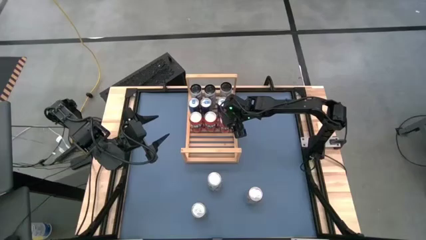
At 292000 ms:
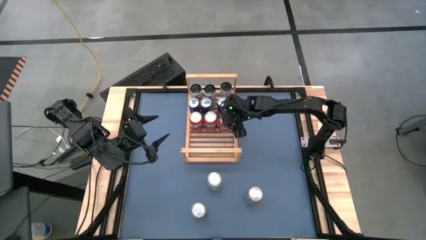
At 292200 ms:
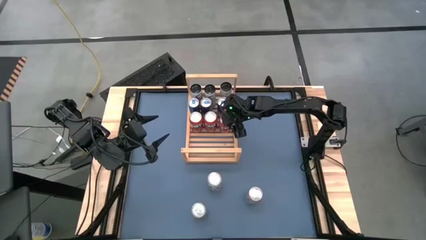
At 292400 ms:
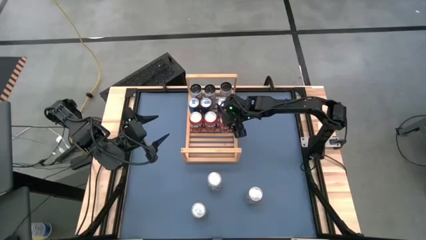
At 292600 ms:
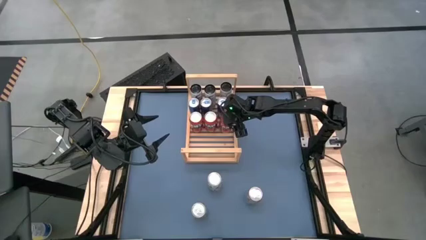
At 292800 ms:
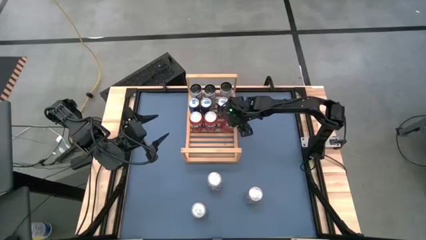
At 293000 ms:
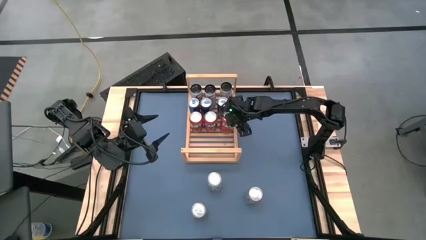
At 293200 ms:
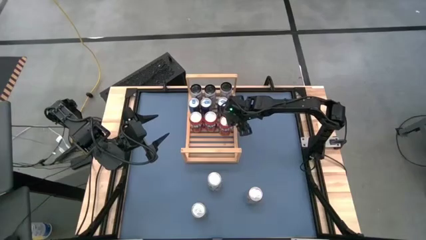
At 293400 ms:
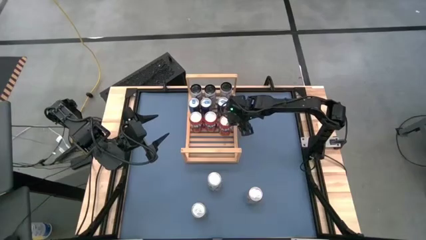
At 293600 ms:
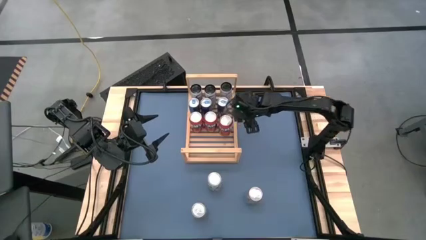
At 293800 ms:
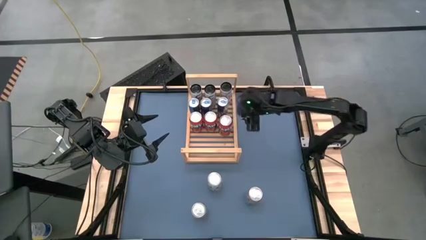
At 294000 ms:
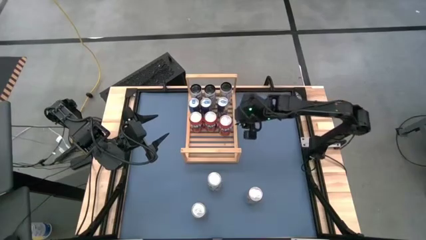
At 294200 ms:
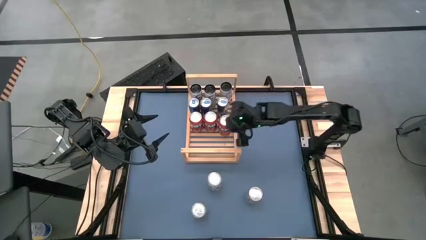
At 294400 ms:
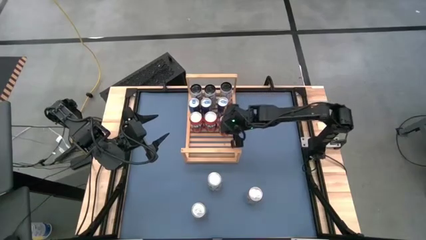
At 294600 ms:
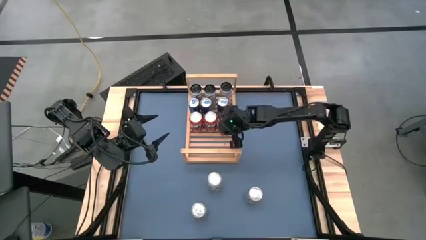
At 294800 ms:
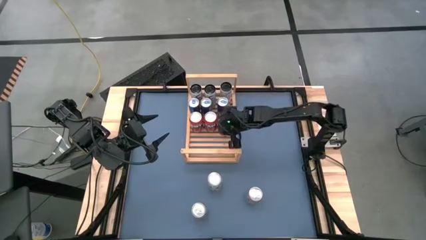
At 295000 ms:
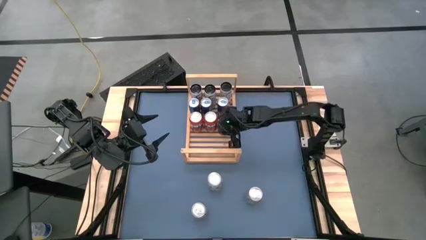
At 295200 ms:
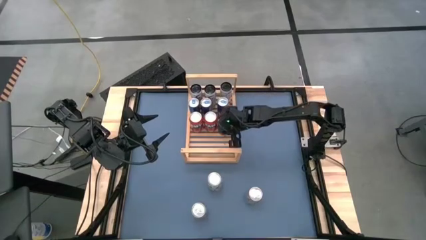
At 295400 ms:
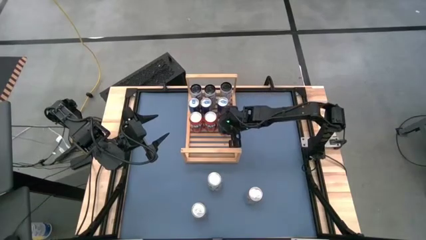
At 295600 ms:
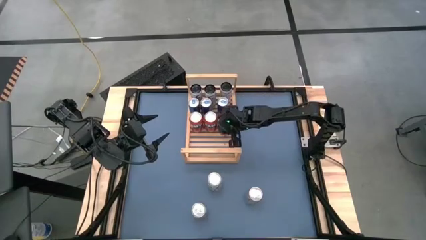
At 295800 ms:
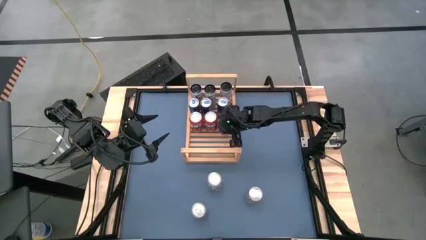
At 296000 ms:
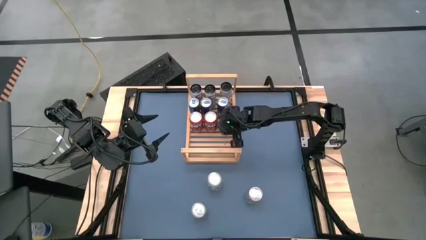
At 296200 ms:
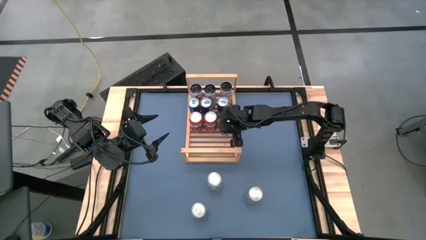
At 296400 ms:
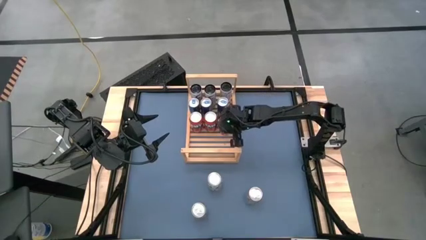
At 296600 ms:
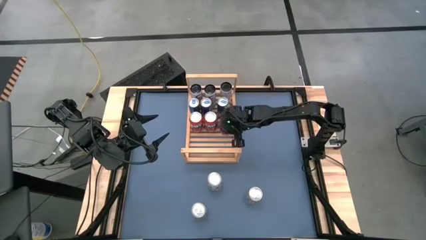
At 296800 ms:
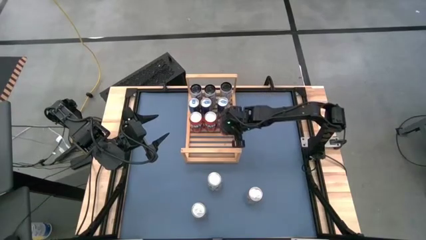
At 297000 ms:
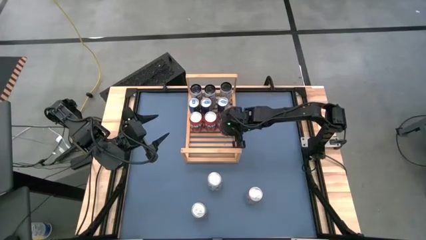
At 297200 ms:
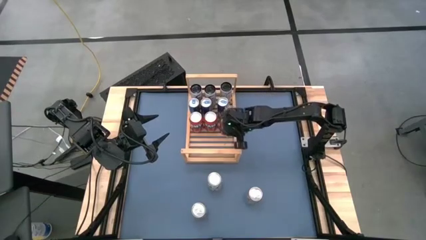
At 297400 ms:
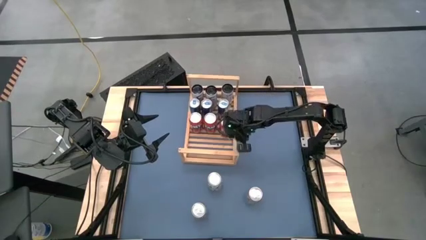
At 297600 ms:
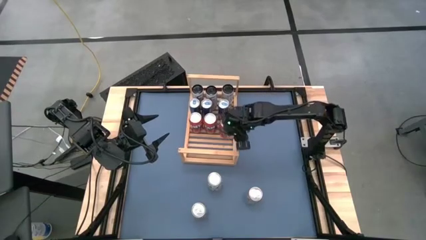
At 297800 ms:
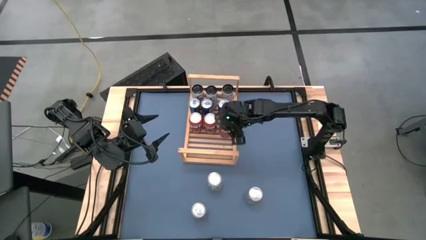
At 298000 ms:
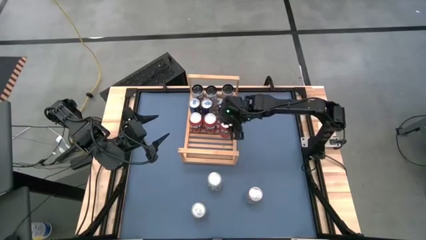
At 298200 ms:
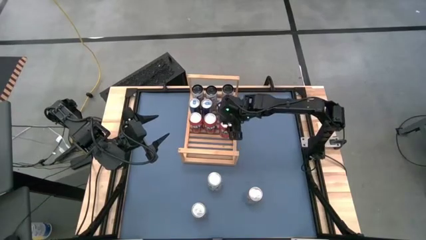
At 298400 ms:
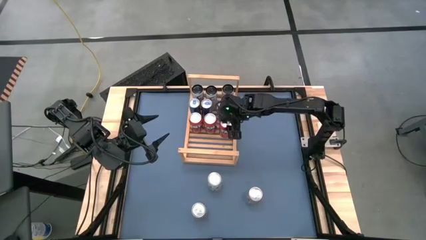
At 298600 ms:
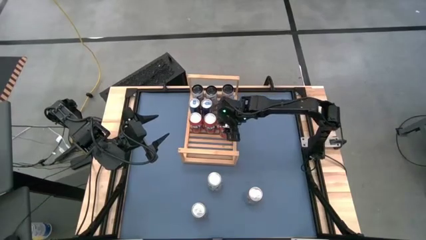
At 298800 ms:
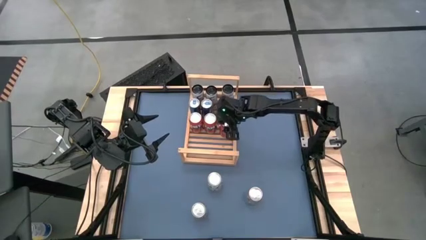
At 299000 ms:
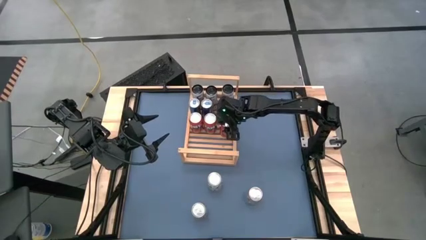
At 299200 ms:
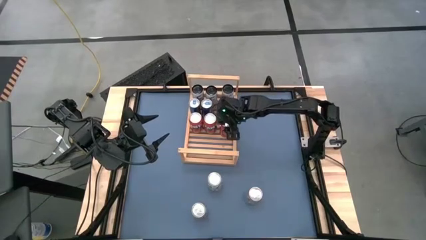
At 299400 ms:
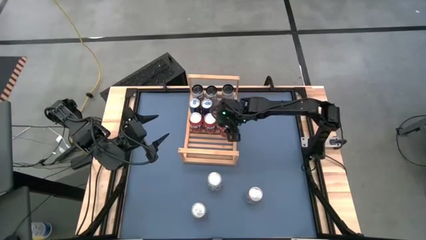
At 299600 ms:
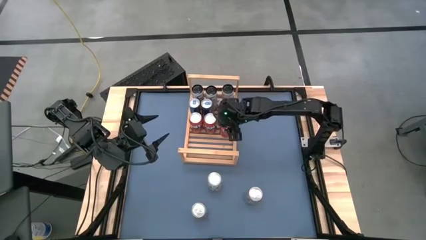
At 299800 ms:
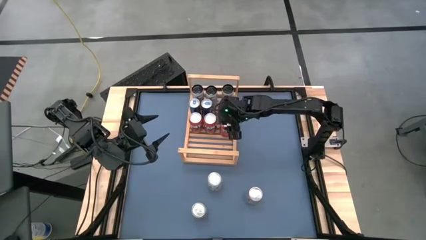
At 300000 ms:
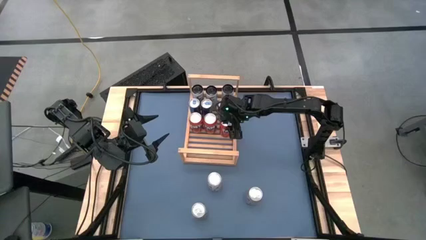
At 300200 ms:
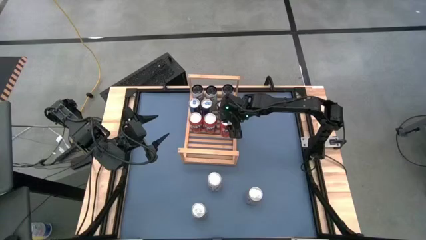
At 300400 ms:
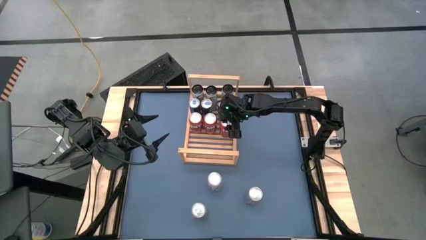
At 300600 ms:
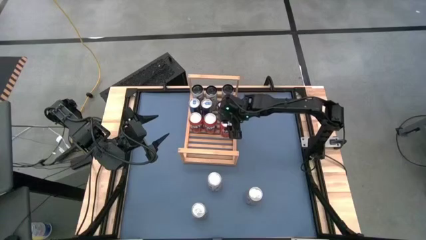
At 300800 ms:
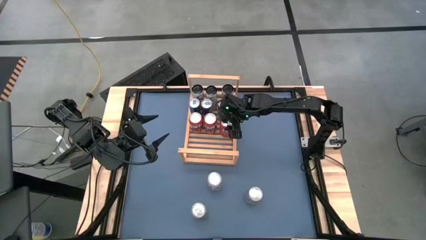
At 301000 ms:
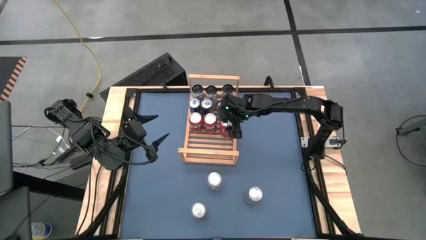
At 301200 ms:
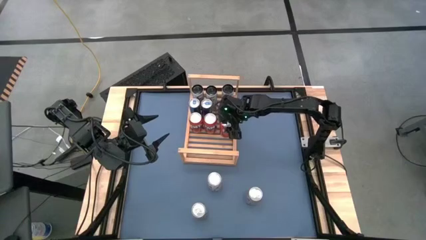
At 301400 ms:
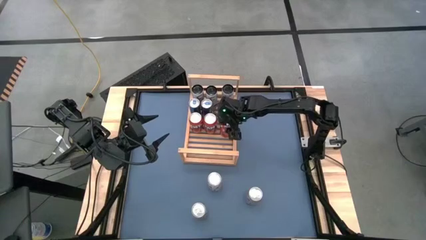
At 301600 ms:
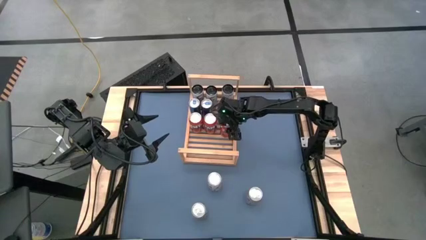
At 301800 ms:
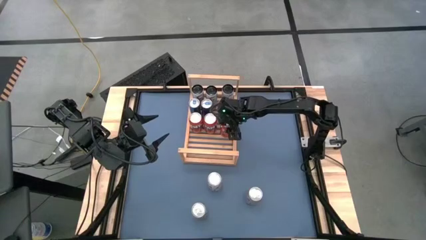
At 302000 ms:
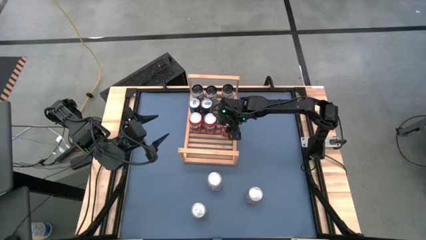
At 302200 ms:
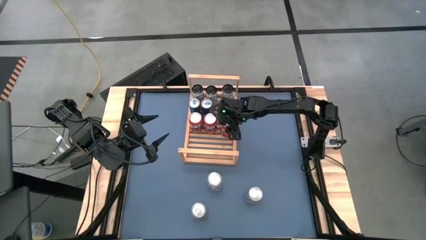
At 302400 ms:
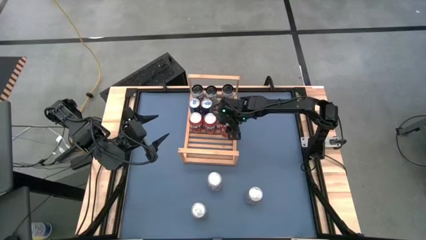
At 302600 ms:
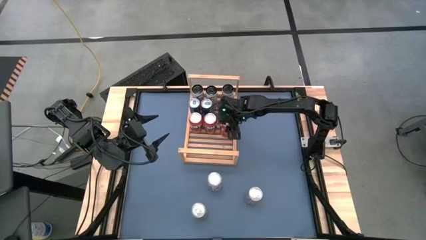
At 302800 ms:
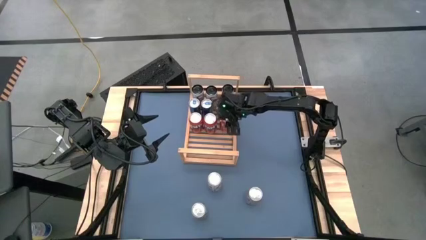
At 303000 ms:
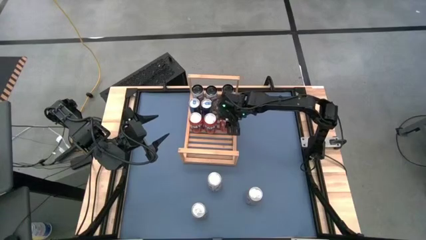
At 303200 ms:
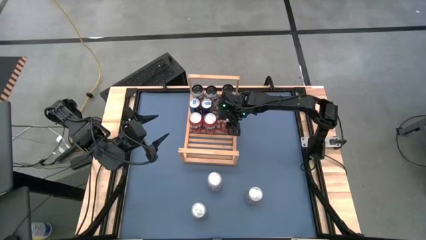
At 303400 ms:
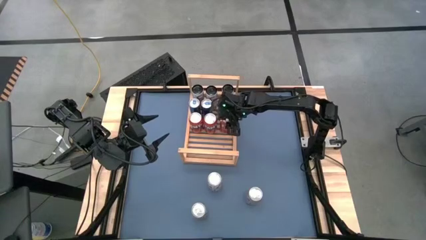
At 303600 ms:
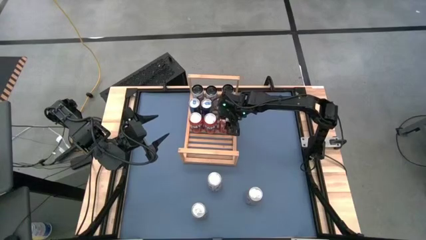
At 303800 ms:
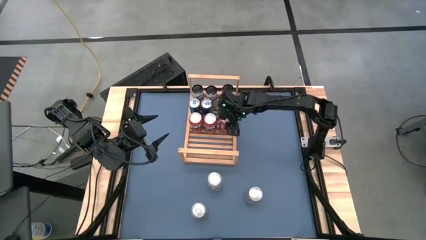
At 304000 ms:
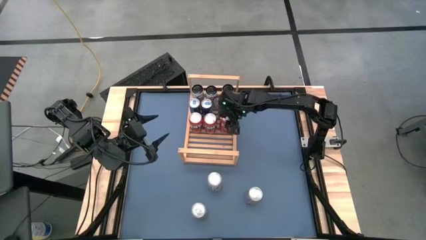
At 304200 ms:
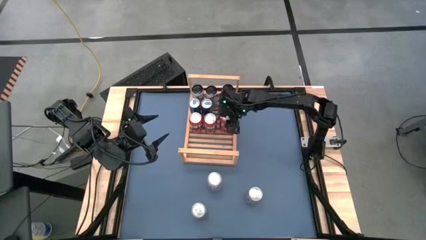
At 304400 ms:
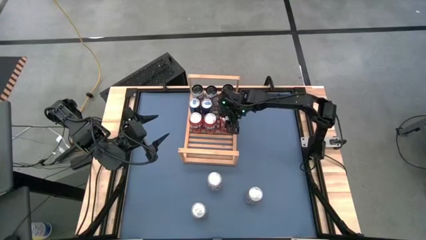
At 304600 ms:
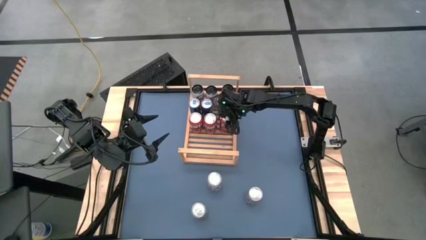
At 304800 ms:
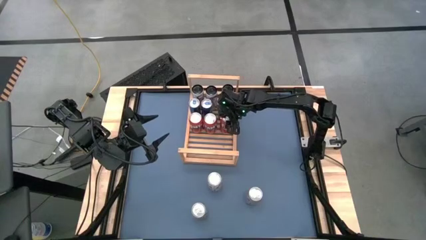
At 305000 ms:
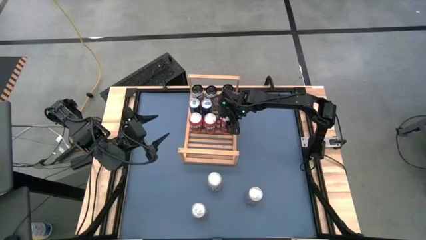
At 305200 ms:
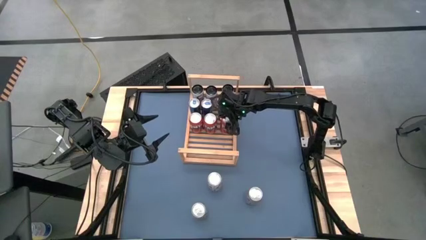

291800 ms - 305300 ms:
Task: Place canned beverage on shelf
Put the orange soda can on the shelf aligned with the other orange soda cans

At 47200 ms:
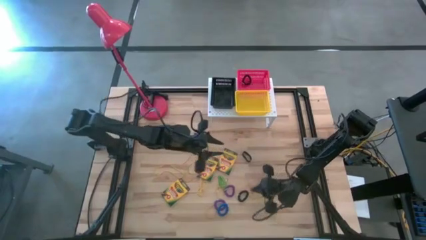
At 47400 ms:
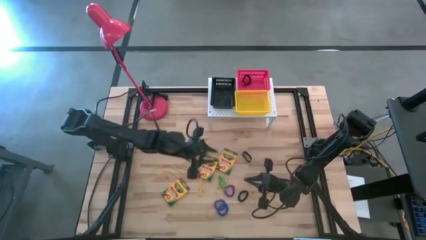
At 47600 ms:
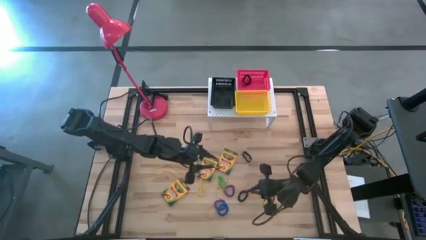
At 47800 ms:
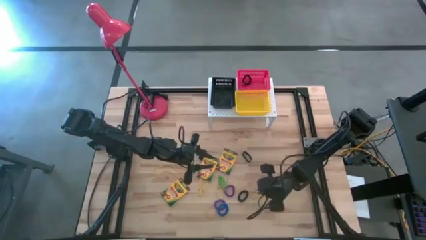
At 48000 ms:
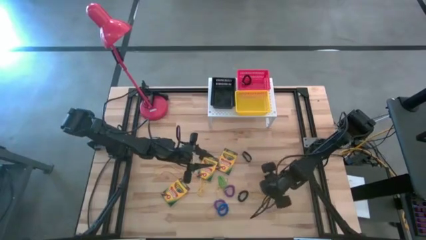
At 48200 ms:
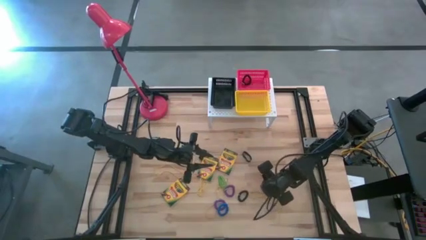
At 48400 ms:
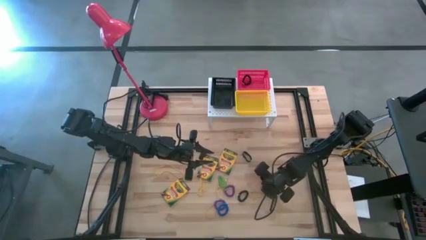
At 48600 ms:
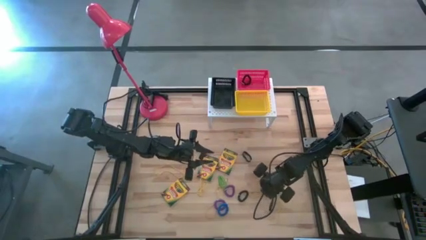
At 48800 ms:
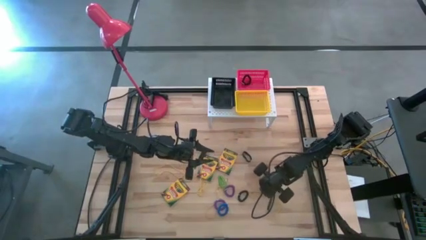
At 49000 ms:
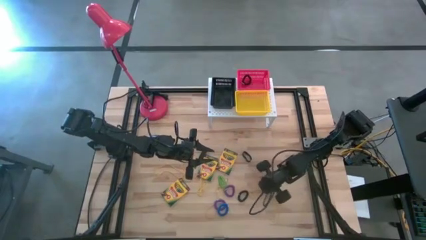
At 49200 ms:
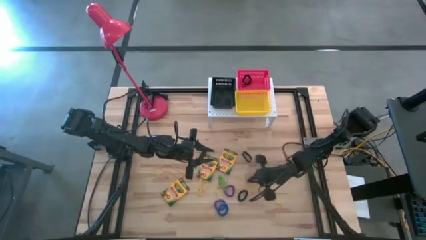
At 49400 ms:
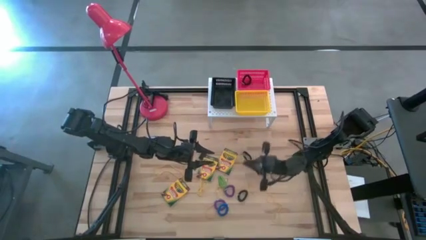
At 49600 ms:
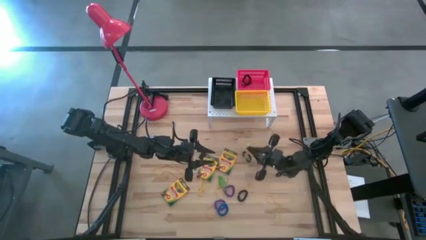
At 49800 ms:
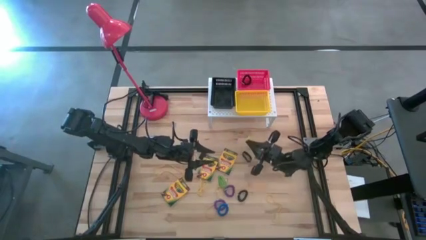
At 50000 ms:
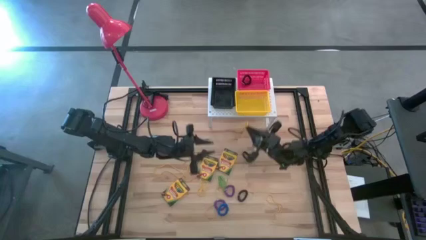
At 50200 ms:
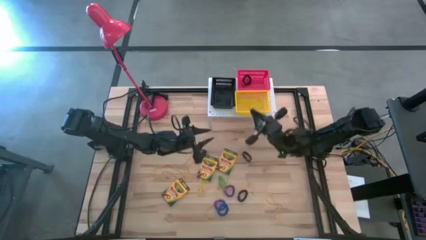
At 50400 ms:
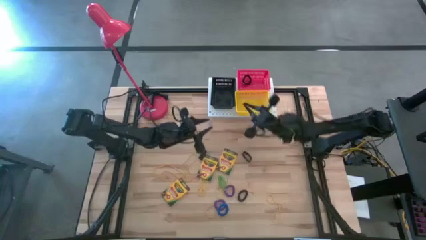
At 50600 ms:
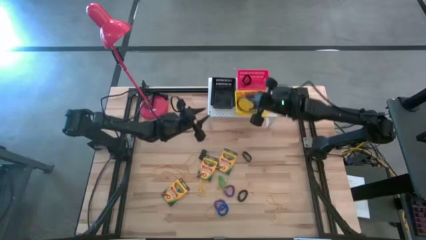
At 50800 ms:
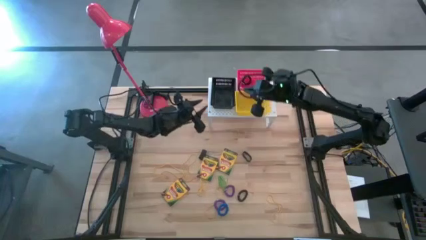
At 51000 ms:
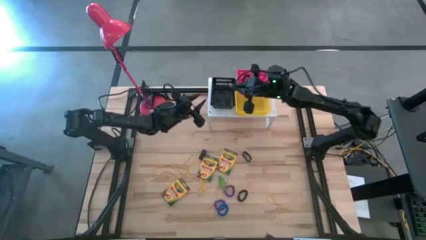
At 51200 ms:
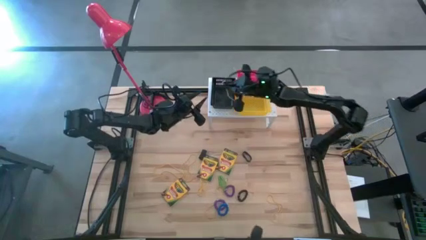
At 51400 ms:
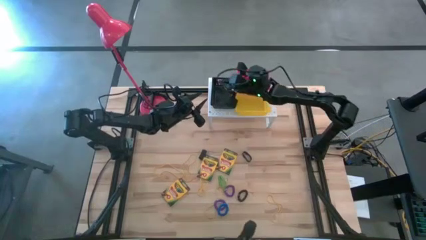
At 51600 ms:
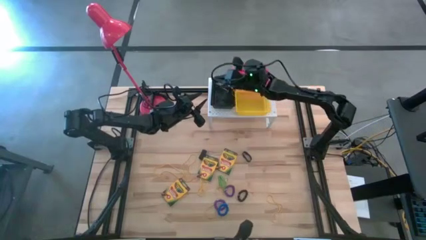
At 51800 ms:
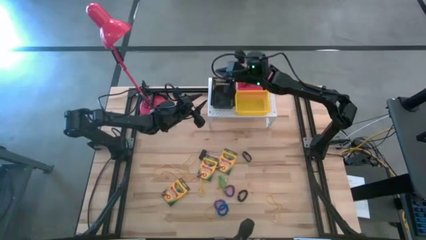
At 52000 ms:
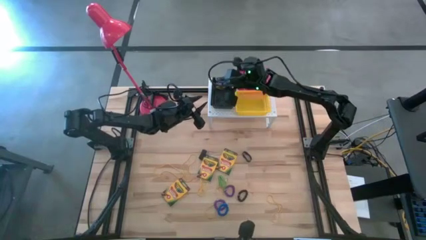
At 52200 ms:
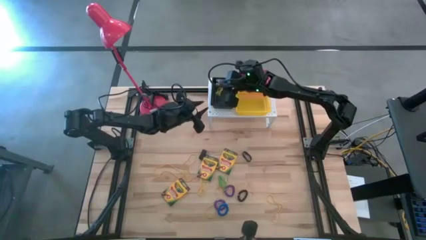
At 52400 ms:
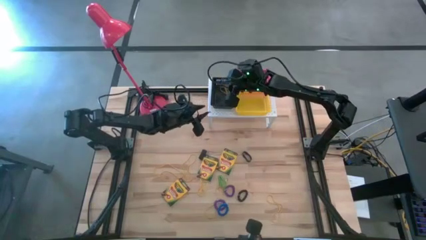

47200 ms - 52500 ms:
Task: Pick & Place Office Desk Supplies
Put the yellow rubber band into the black bin on the shelf
